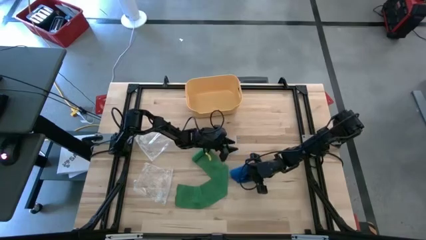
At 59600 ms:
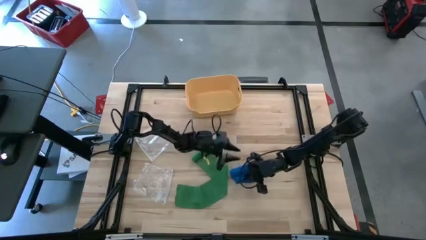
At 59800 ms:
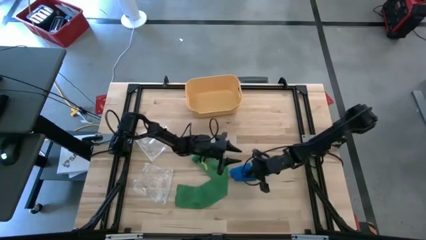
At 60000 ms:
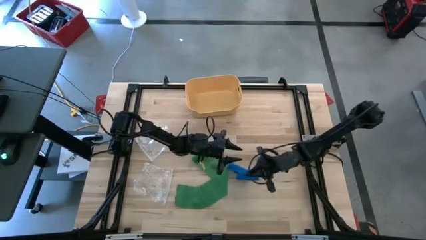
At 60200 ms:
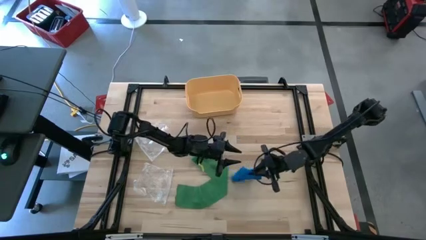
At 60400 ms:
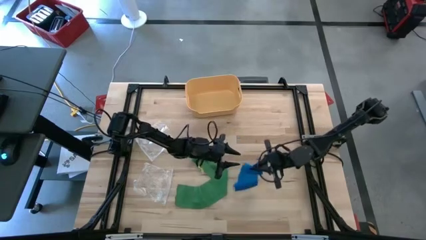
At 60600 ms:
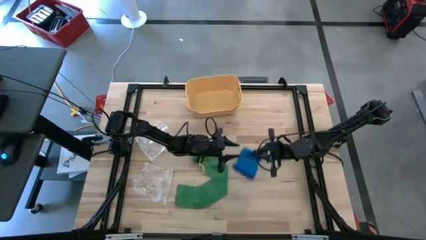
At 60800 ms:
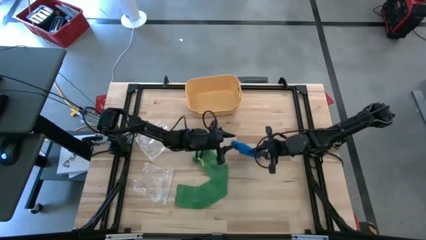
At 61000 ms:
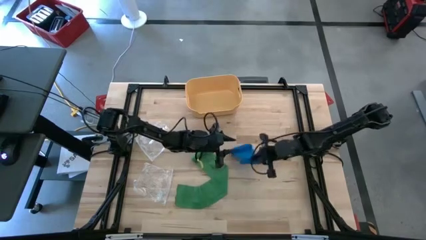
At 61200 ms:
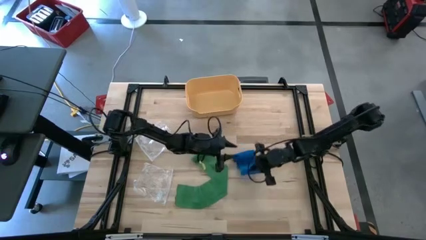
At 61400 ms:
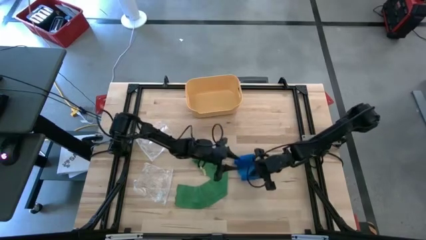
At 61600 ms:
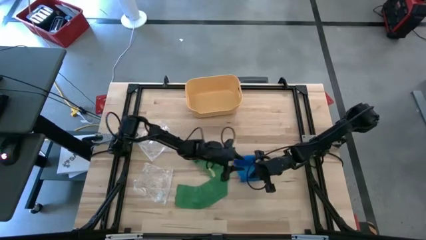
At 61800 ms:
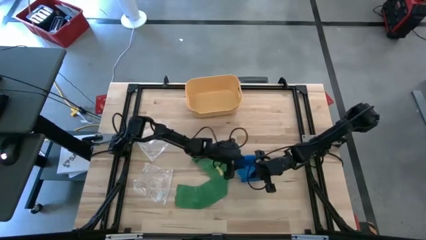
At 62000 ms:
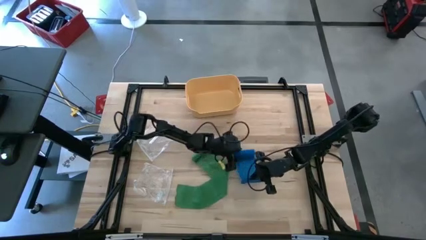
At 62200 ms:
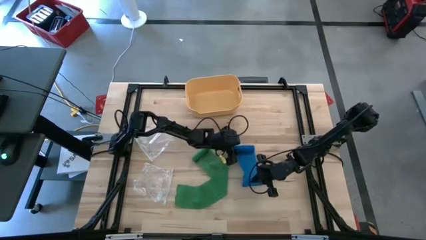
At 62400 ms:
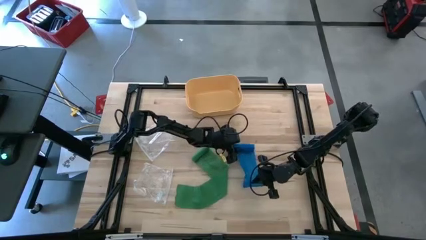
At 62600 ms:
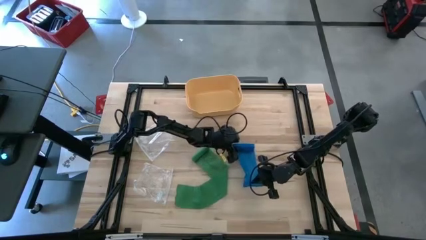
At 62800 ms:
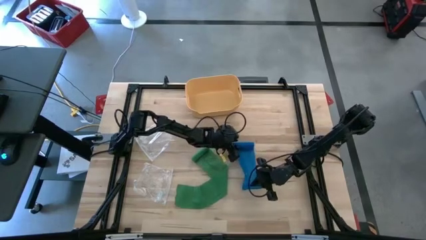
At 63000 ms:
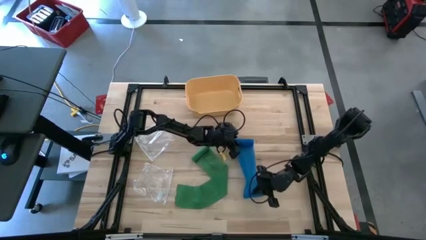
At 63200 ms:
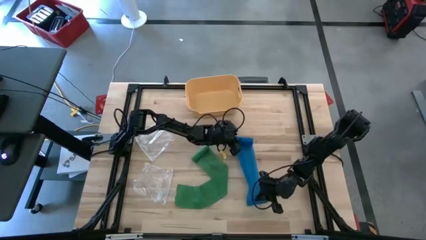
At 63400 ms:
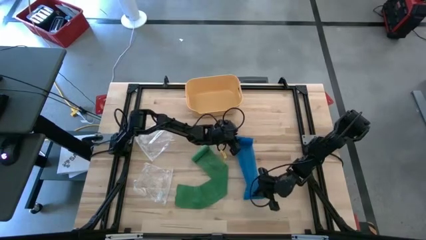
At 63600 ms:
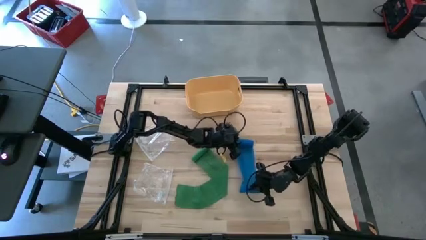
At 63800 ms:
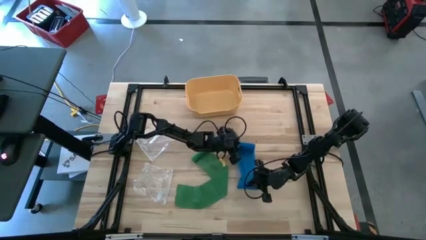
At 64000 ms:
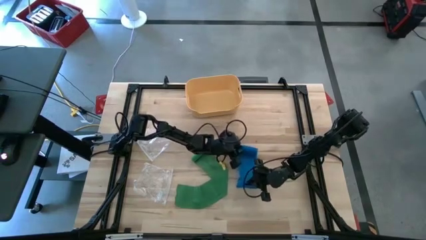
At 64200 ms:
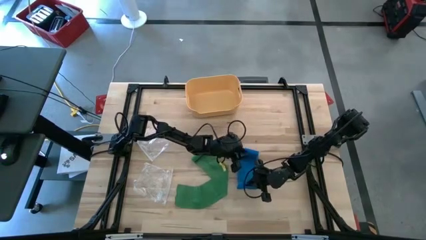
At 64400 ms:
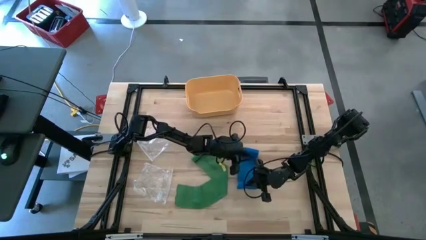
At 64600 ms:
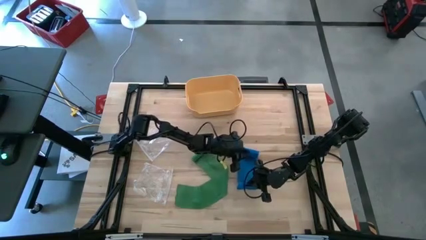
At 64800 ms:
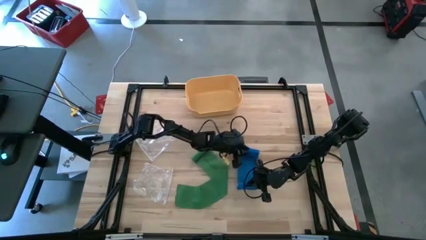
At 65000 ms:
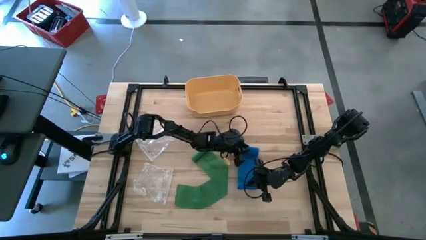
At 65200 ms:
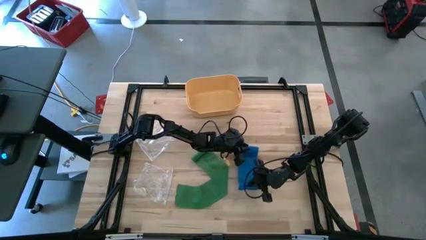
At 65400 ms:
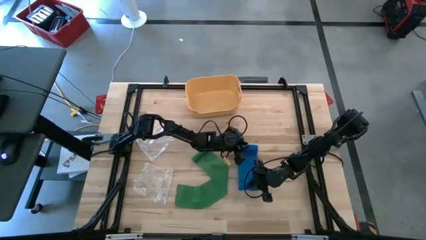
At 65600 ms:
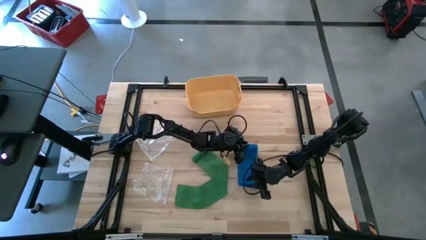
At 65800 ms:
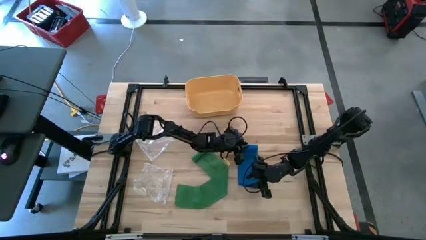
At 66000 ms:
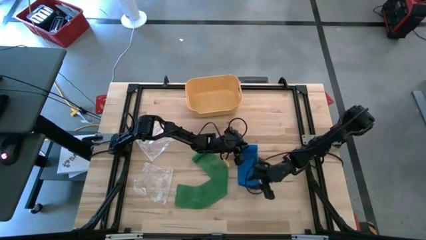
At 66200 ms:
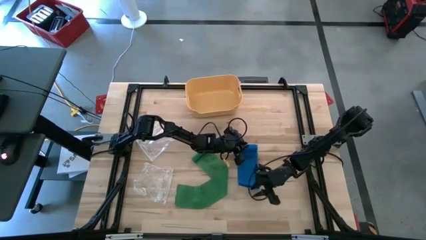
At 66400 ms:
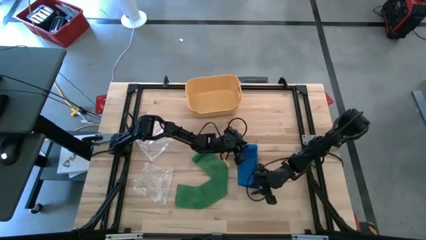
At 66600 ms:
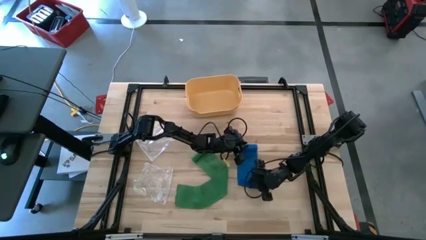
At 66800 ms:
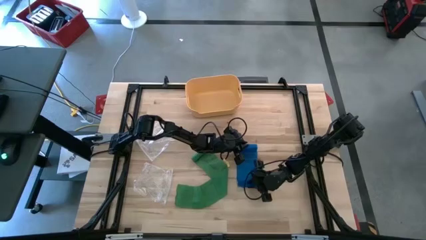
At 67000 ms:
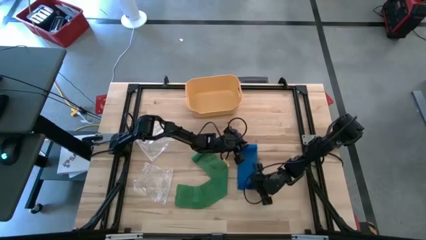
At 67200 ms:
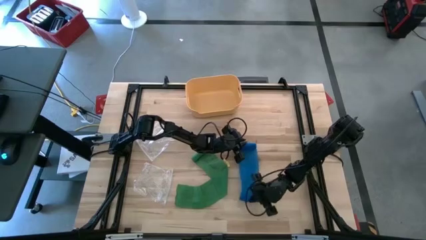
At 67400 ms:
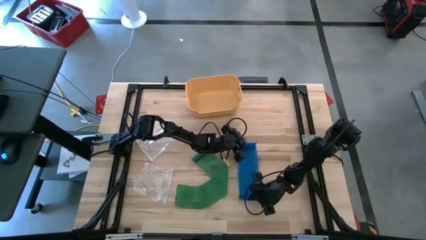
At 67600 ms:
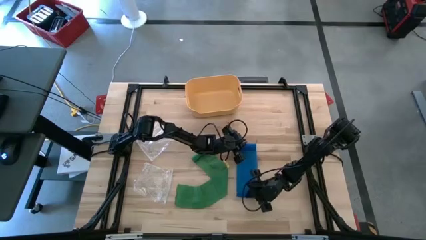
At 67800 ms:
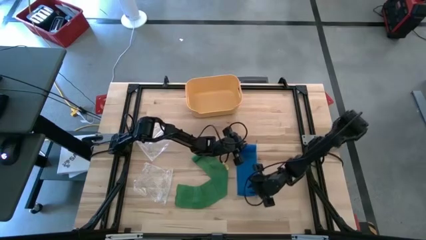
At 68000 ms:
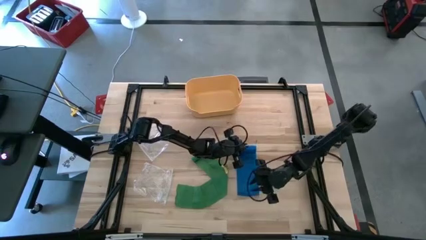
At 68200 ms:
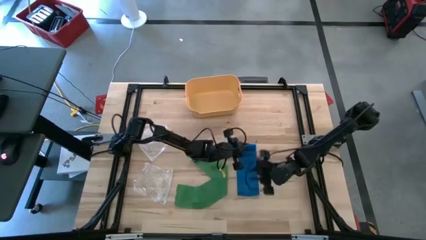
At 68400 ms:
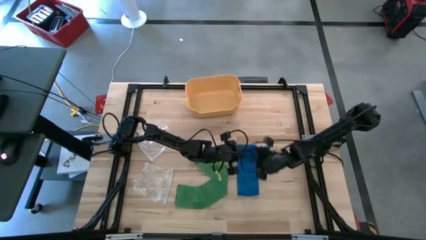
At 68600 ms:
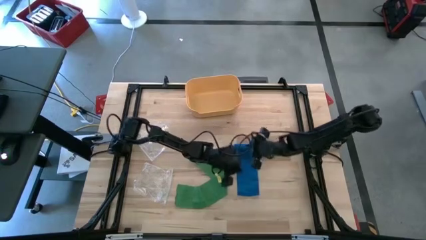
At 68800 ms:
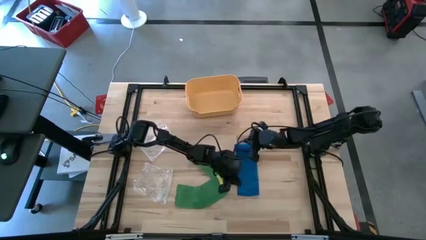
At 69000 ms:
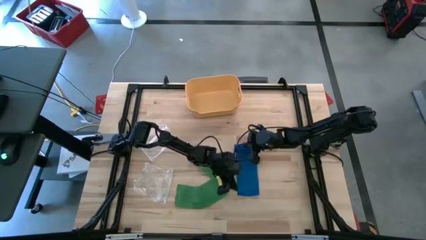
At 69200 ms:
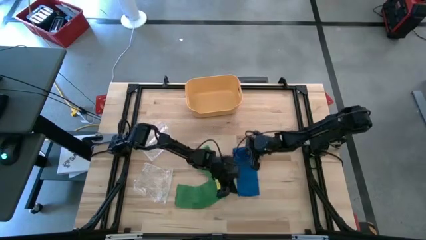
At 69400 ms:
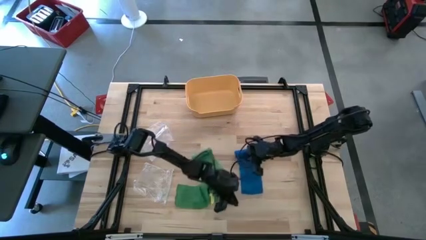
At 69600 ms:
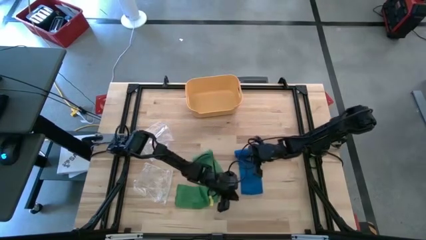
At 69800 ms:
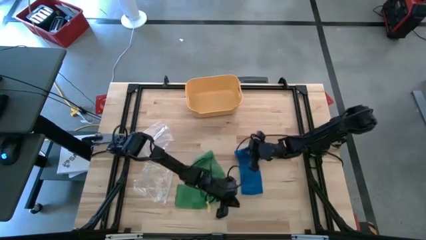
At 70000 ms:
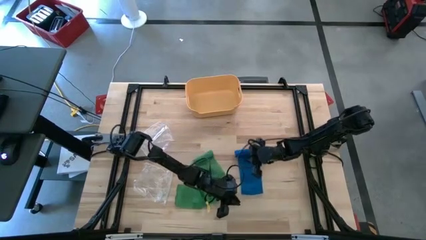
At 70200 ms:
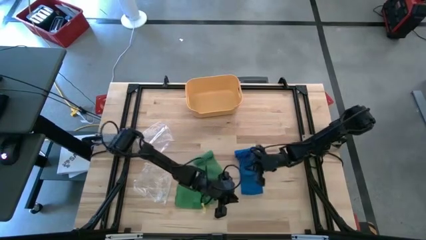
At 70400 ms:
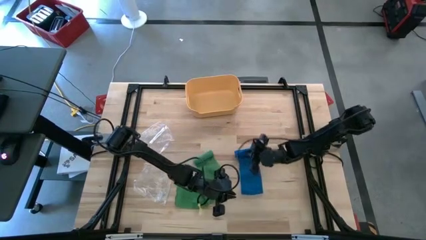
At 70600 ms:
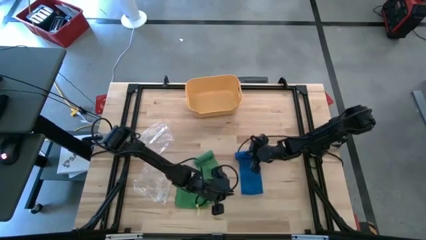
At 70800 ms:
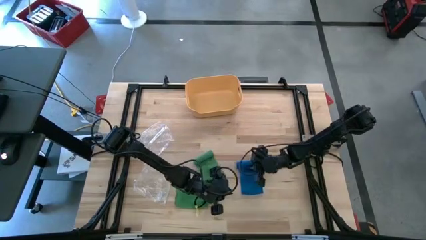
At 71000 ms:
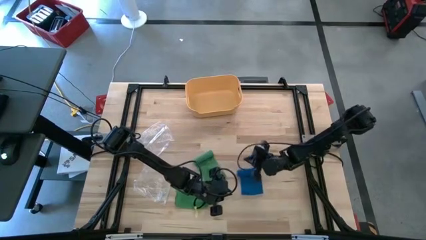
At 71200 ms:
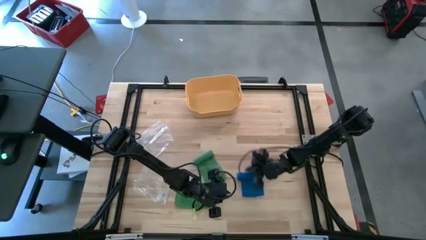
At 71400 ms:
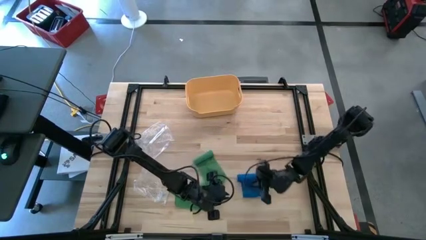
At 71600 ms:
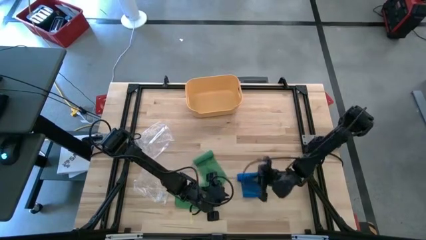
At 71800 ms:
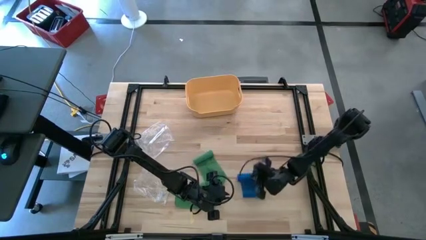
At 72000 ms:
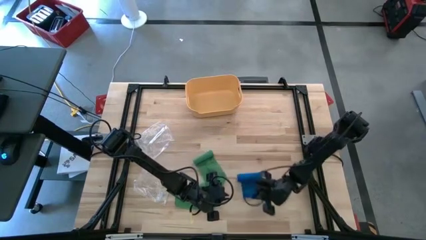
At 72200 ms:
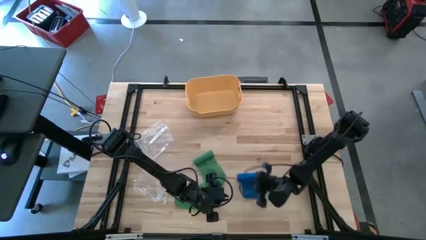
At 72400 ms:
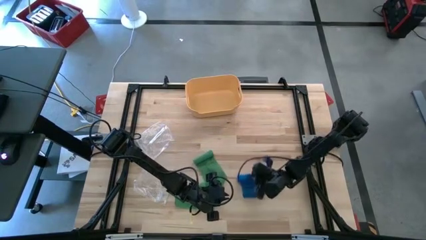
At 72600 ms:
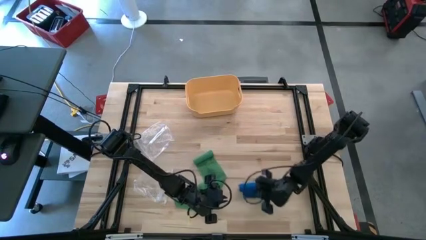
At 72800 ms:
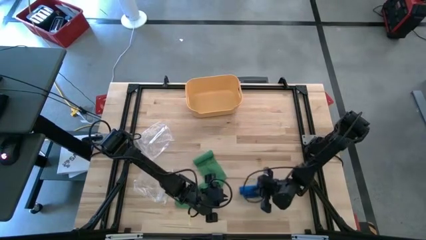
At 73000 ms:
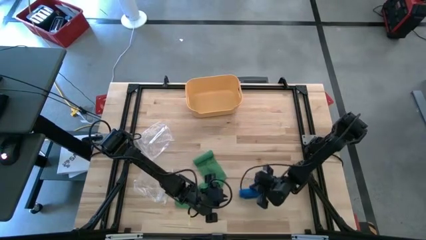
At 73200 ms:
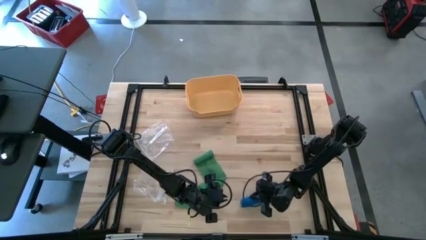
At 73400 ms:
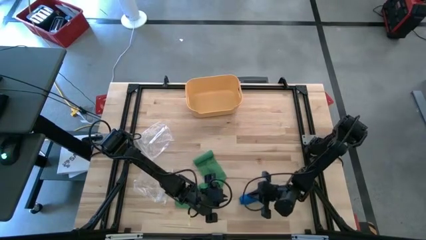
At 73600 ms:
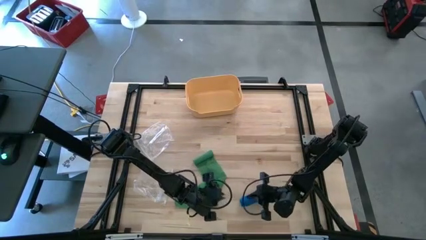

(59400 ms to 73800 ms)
Task: Roll bandage
Roll the blue bandage

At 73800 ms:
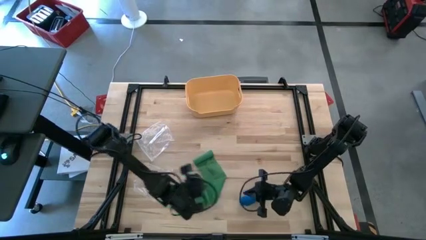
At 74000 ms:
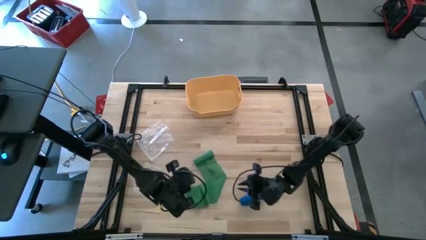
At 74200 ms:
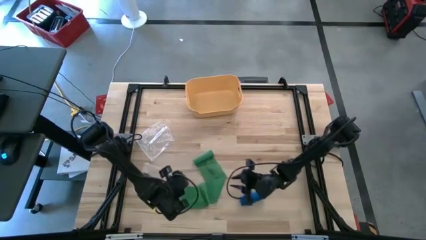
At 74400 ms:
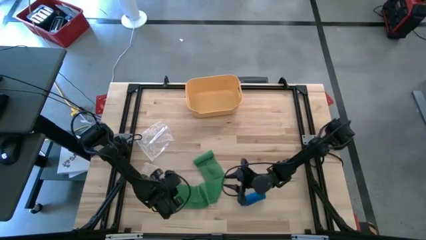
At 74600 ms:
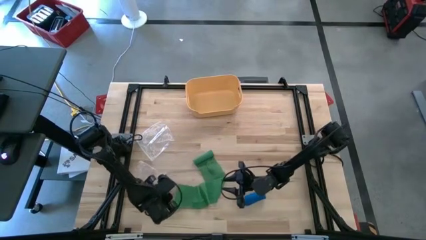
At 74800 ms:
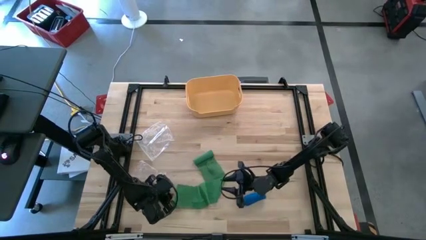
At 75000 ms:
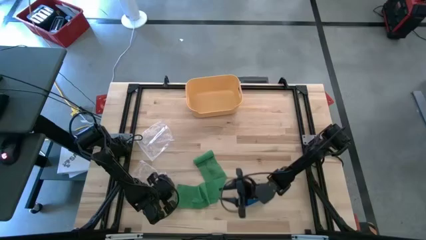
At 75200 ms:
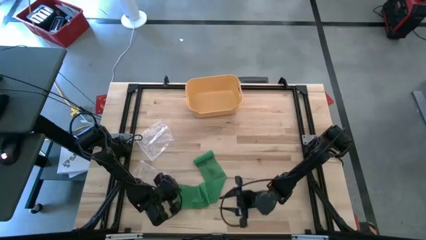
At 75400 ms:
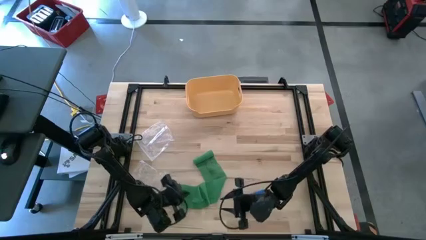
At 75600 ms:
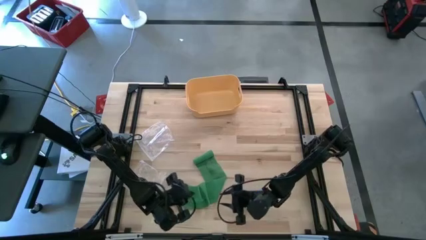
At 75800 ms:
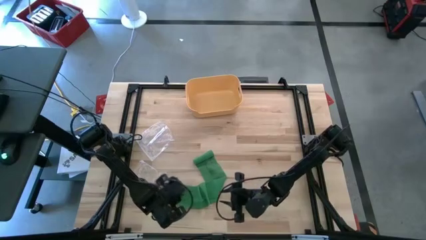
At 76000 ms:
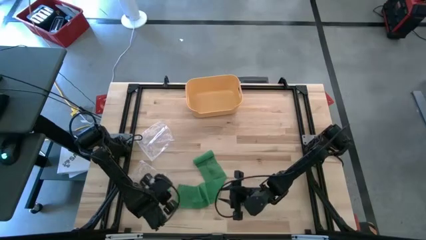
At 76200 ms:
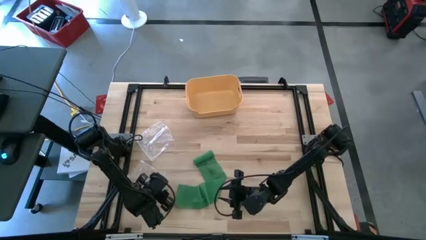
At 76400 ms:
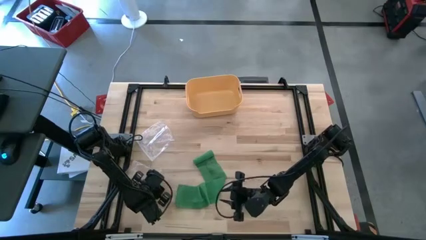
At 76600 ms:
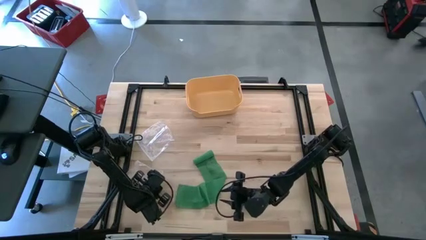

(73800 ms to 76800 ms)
Open the bottom transparent zip bag
